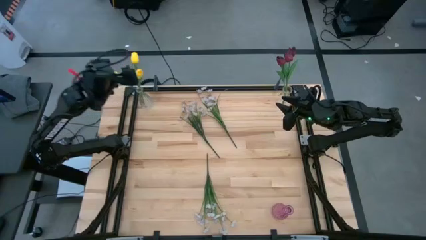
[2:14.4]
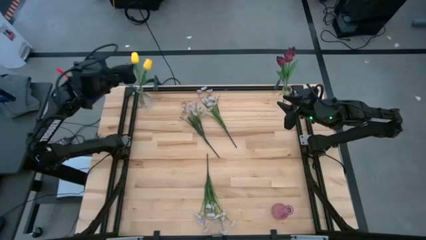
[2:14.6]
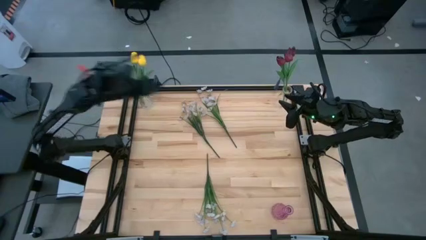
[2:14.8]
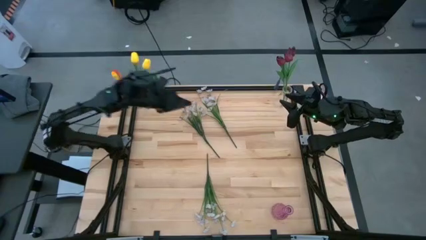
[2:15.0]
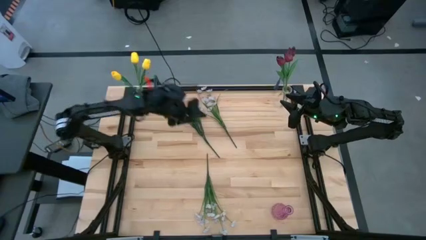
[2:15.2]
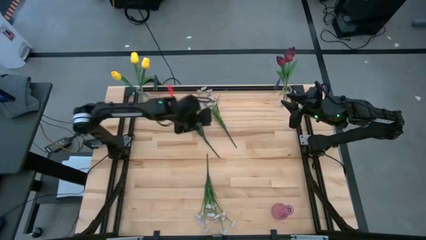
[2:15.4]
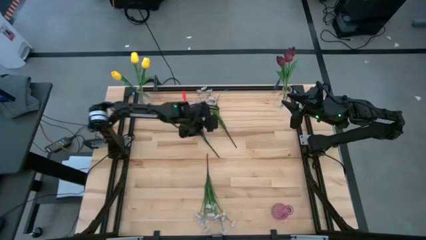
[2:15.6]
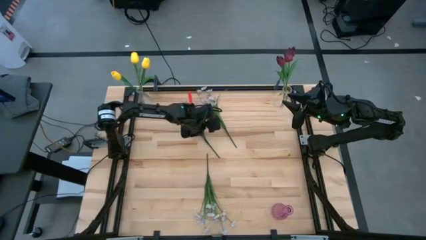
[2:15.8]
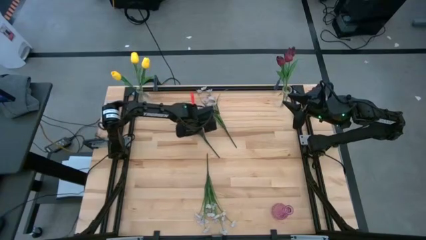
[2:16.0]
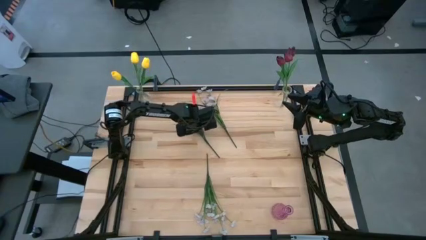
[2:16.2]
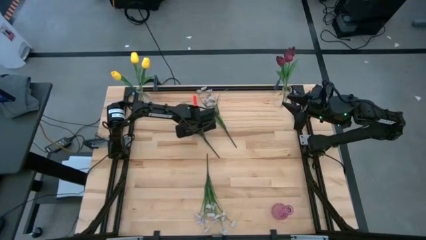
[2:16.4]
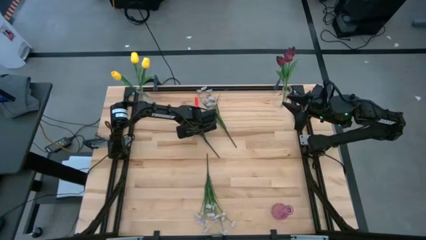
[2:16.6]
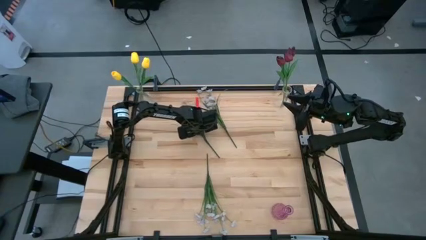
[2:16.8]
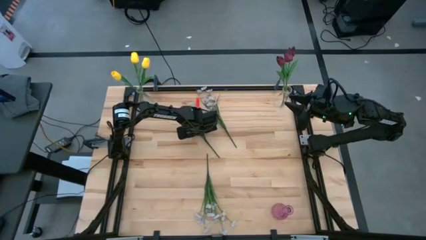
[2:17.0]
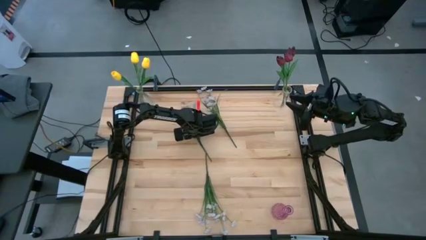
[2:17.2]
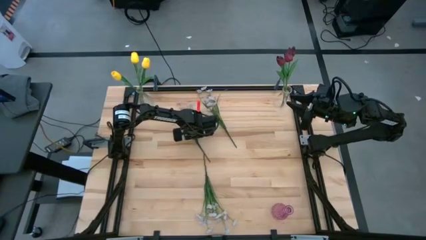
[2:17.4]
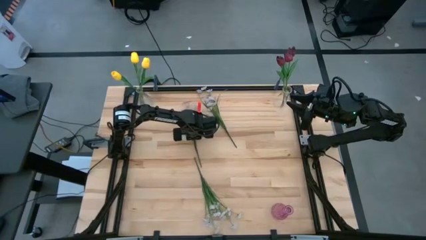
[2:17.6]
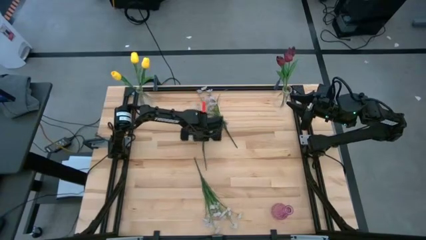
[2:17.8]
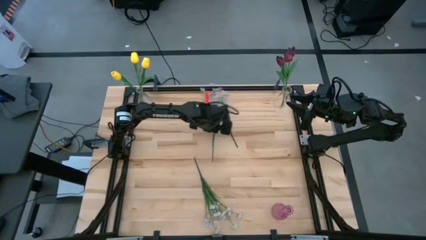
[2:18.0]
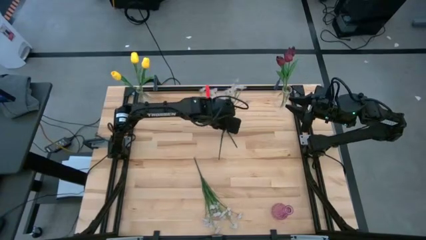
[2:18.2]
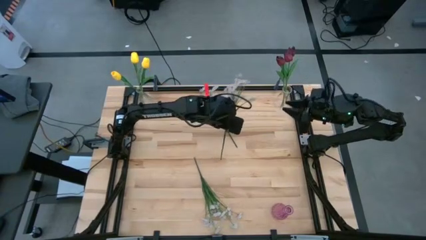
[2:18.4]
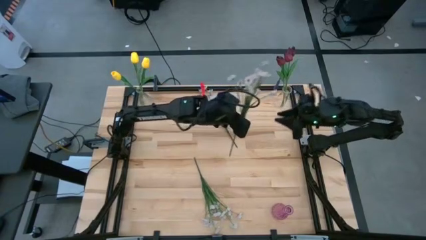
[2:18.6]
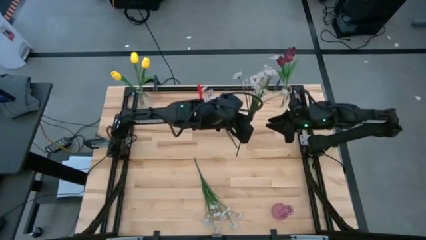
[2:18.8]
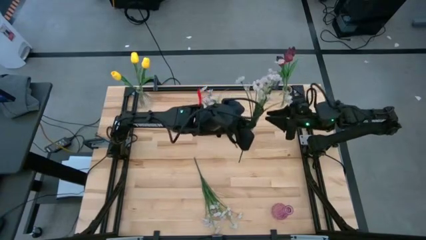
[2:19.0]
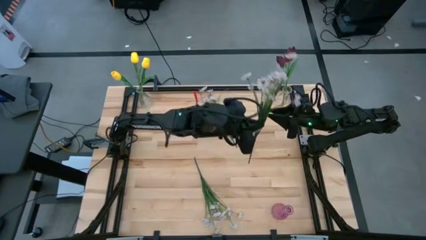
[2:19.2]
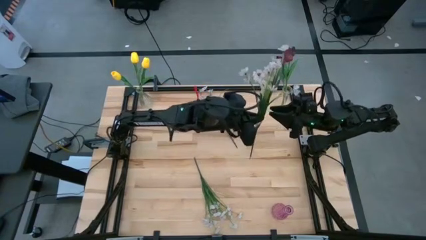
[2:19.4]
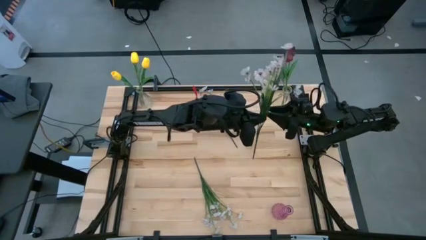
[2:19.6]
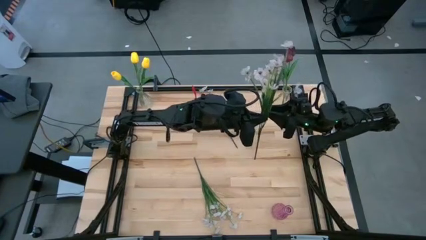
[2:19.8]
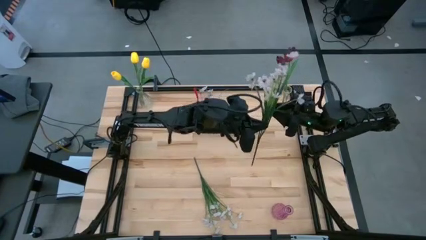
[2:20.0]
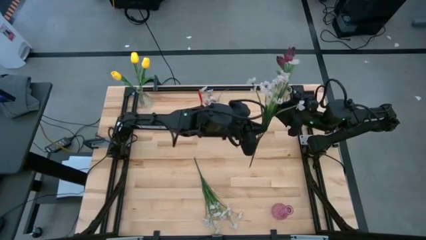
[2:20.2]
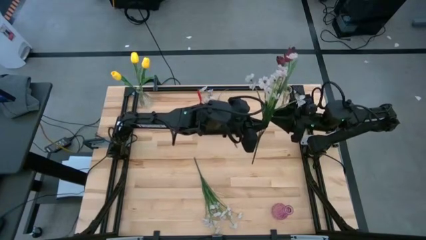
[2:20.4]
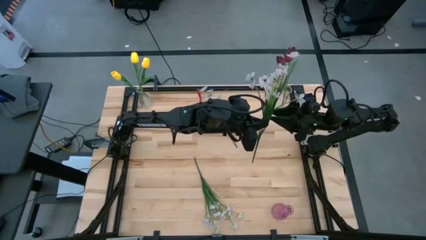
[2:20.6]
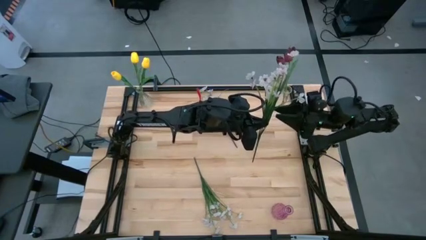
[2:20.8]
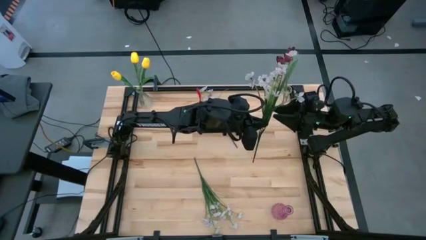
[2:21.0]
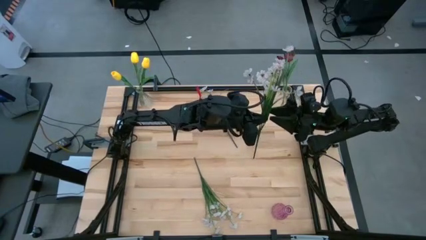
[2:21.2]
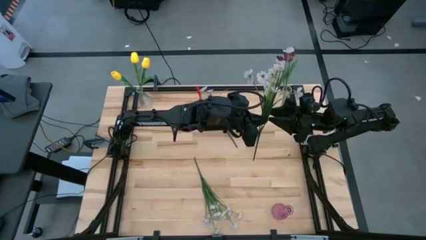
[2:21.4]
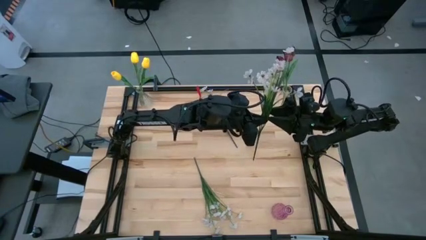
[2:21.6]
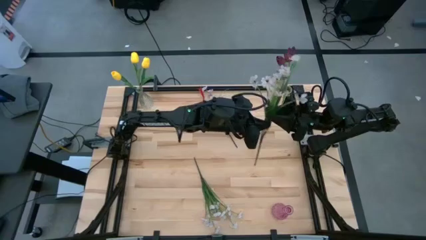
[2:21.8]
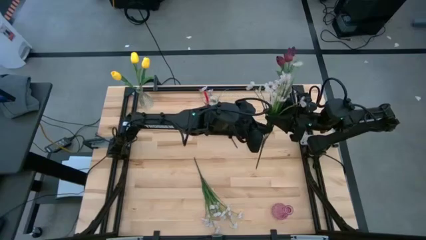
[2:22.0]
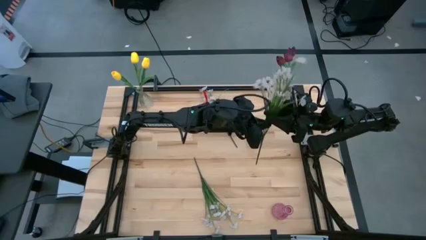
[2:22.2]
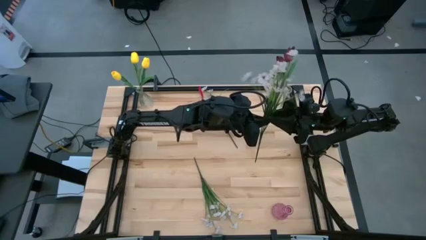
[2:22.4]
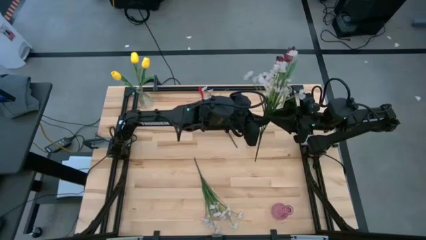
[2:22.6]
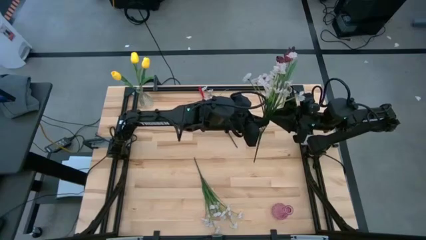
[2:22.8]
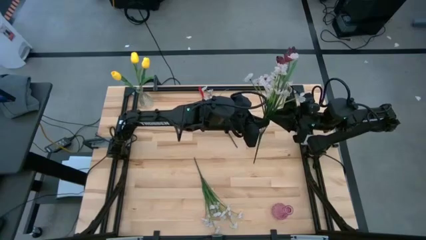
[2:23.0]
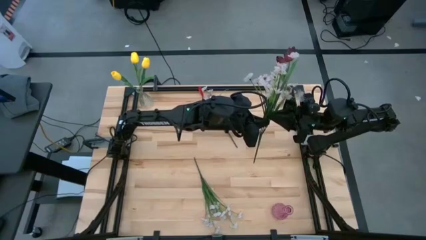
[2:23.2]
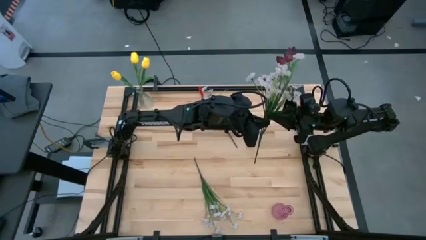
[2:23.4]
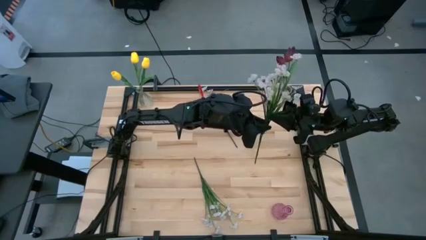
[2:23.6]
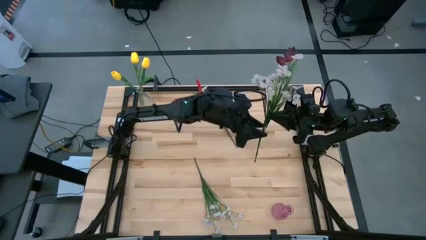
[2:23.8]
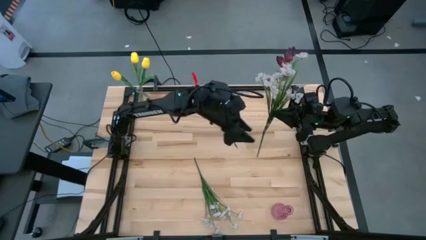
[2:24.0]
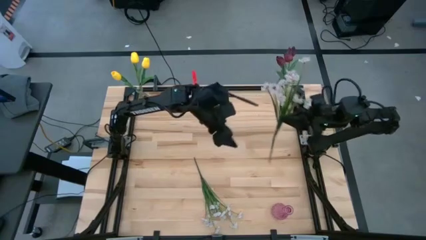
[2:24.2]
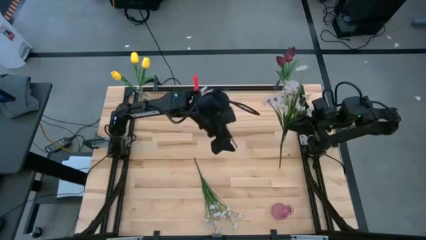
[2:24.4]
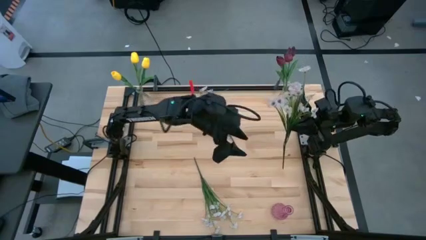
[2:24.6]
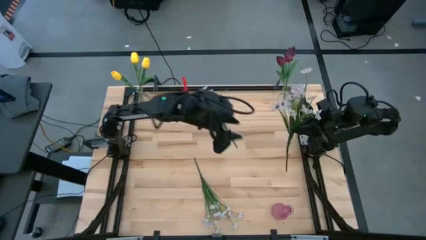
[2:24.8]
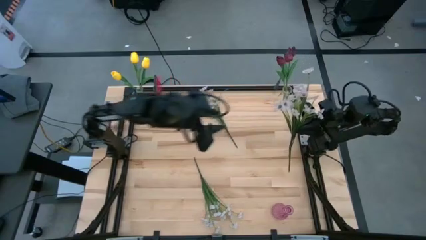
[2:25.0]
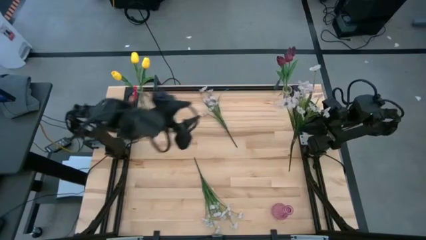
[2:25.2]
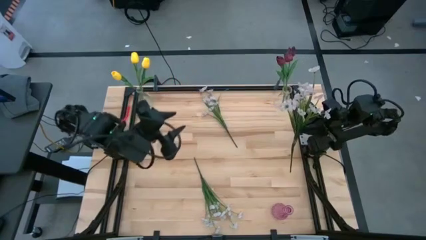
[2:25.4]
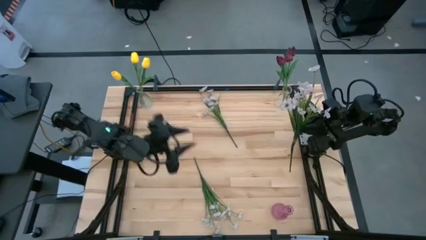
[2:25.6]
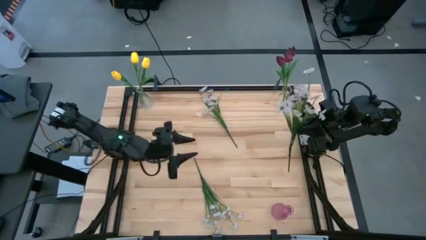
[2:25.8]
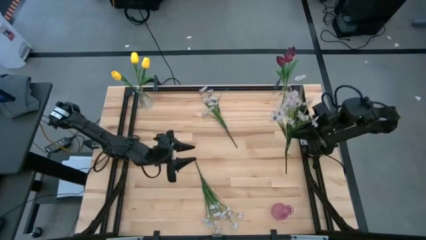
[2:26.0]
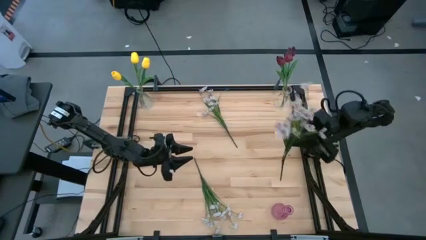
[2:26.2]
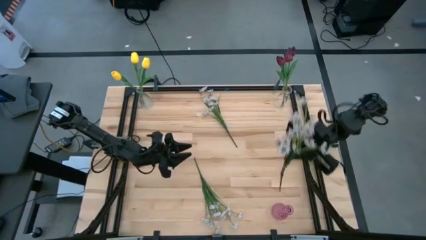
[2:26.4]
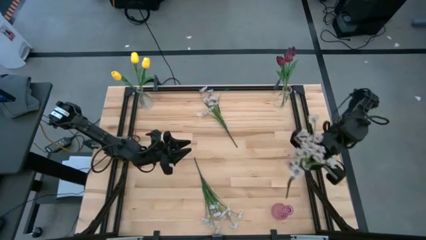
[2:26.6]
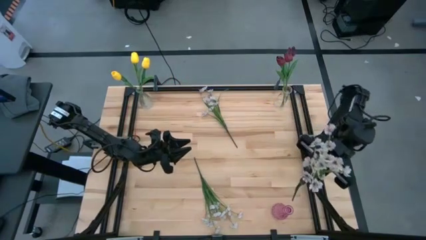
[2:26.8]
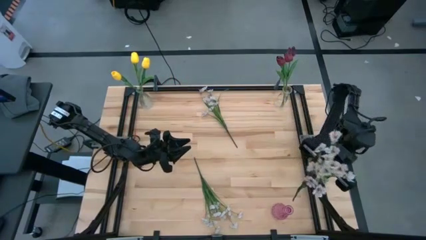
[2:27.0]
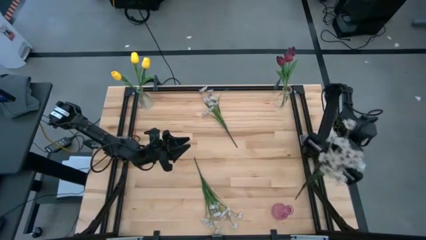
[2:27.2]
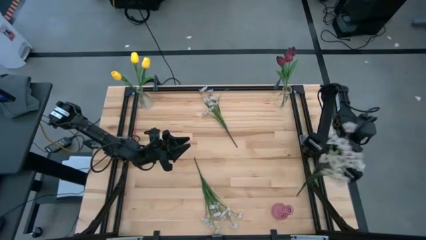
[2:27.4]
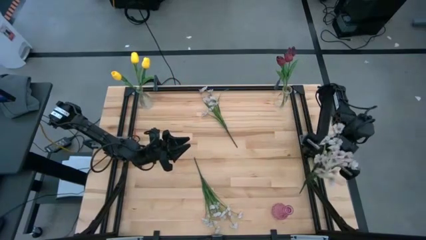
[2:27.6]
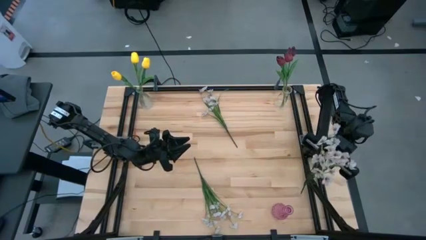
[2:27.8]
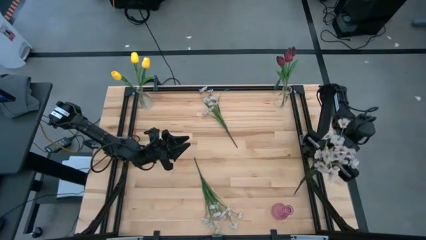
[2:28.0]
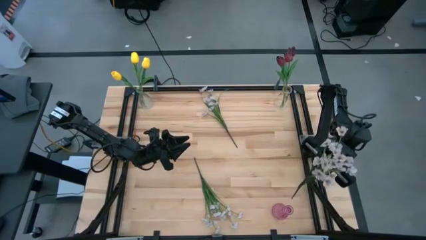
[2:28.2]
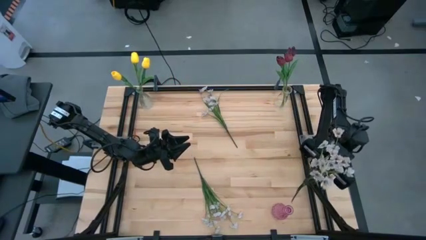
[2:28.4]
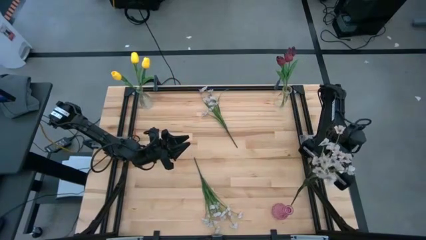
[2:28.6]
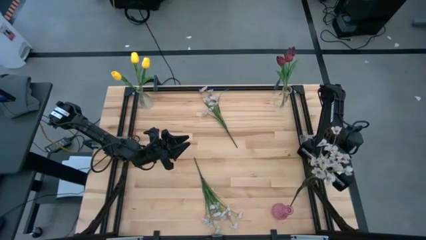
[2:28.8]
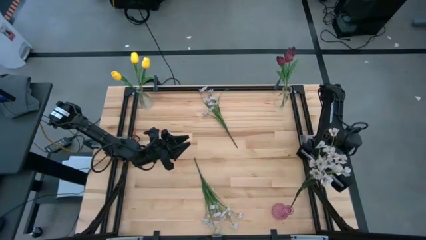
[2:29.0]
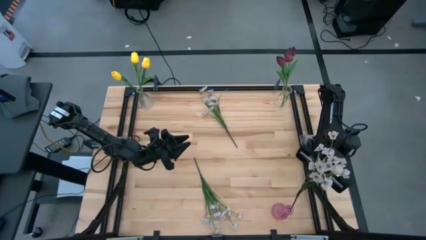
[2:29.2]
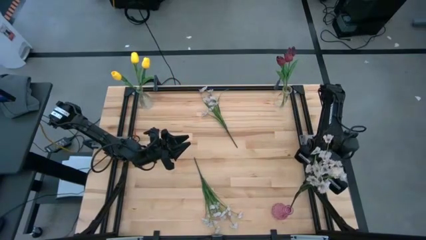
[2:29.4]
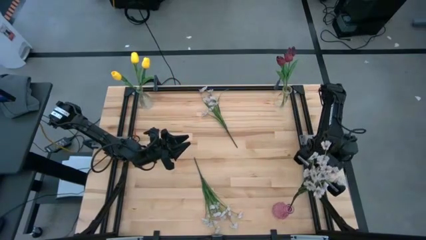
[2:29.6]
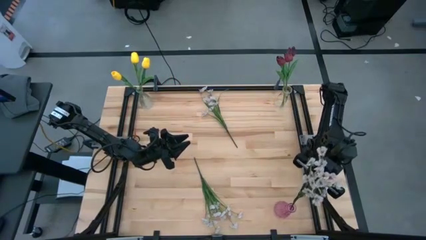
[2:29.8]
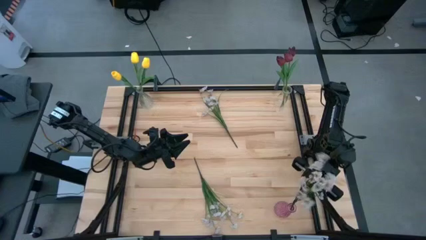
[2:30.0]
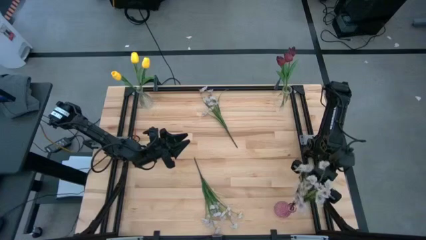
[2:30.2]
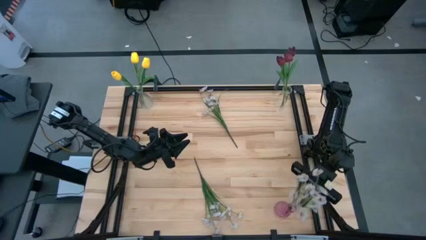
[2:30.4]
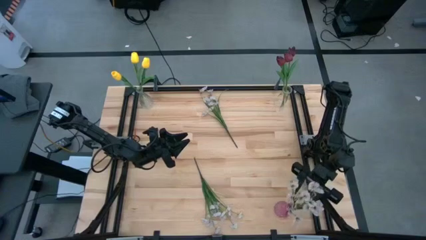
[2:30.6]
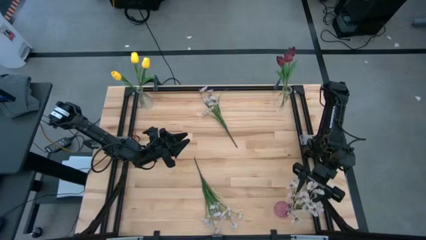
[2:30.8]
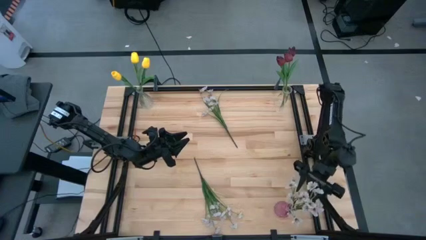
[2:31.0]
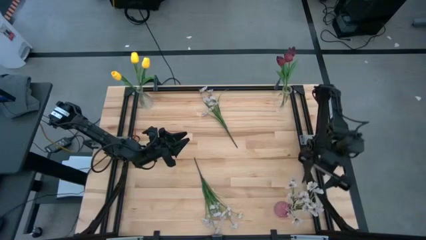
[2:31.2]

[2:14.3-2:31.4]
Task: Sort flowers into vase by color
Put the top left white flowers into the purple vase
